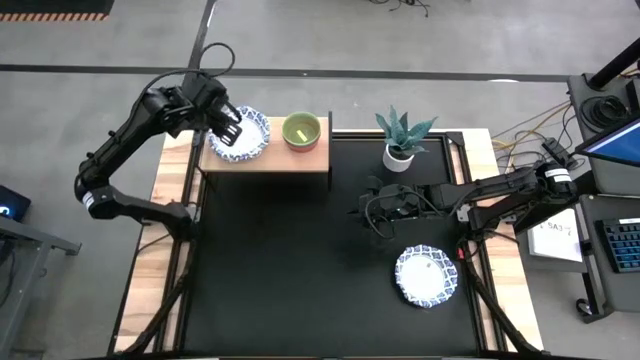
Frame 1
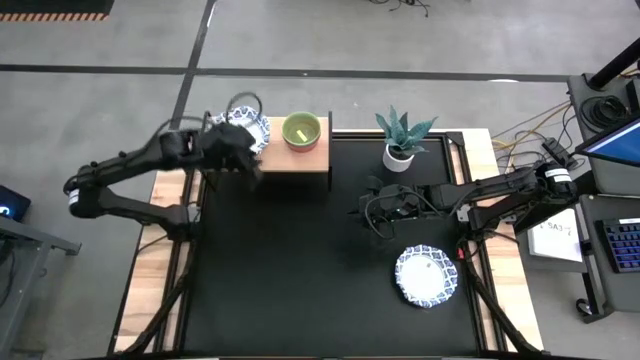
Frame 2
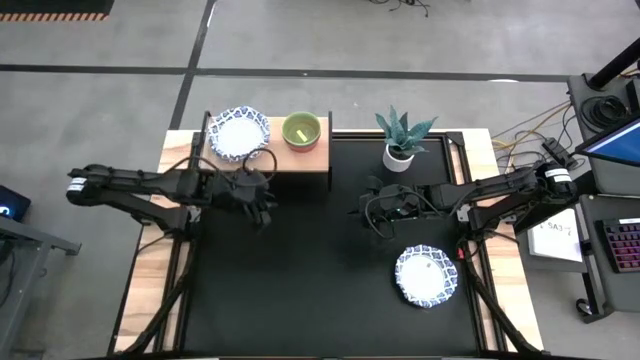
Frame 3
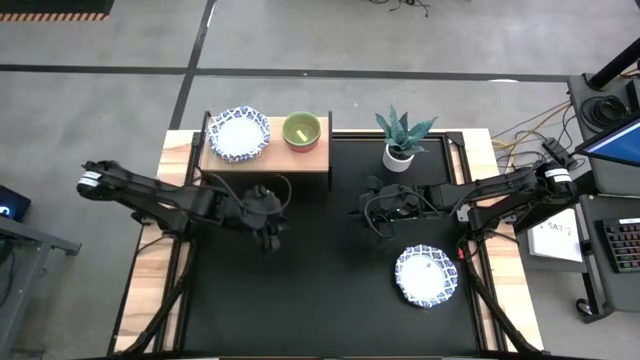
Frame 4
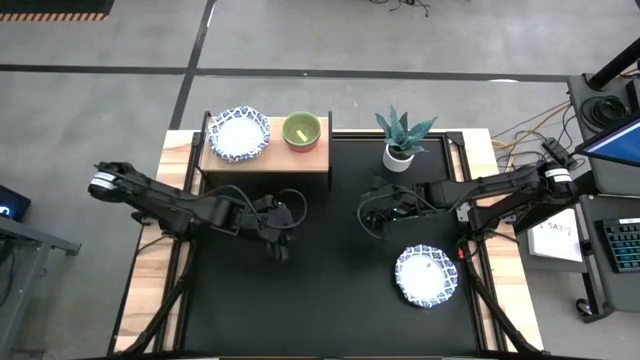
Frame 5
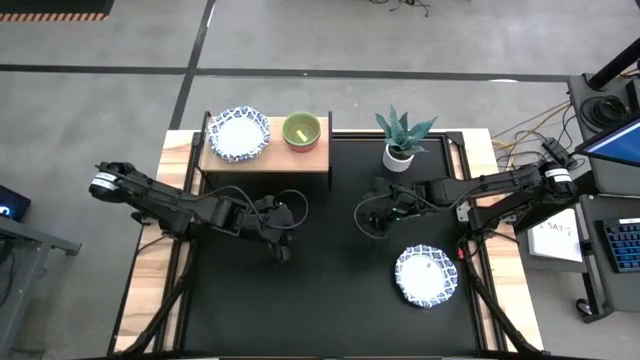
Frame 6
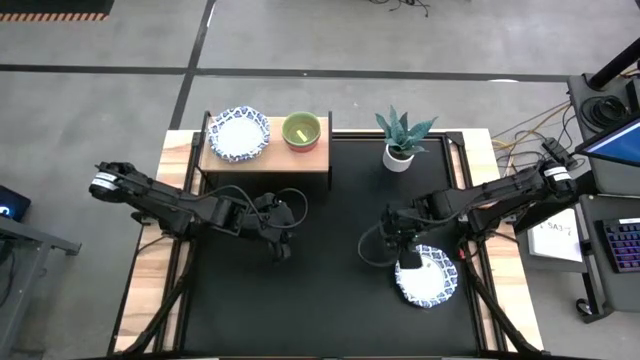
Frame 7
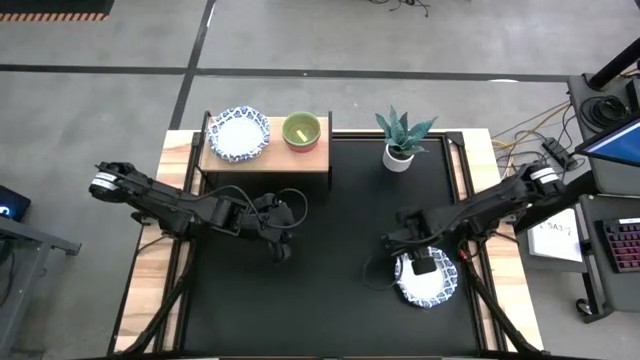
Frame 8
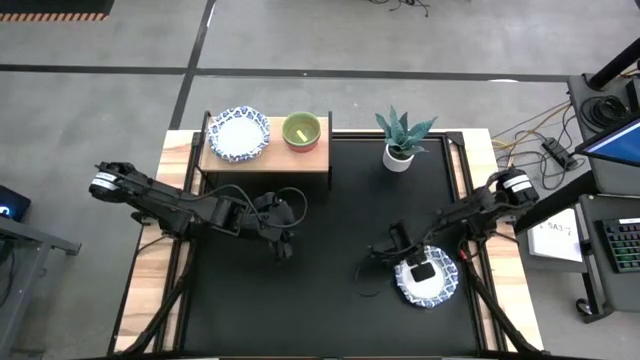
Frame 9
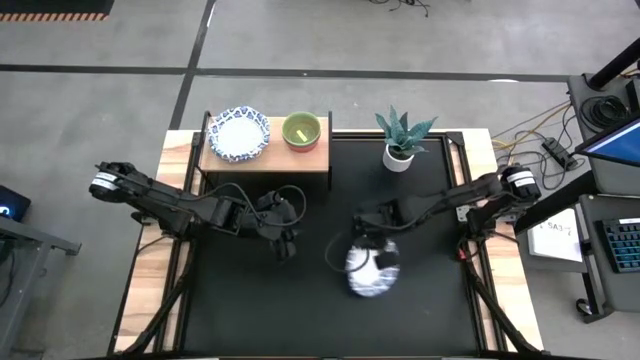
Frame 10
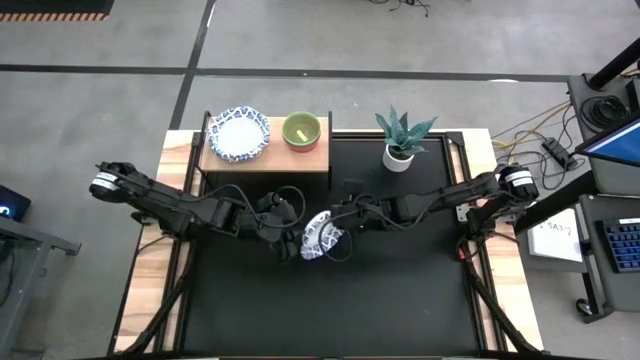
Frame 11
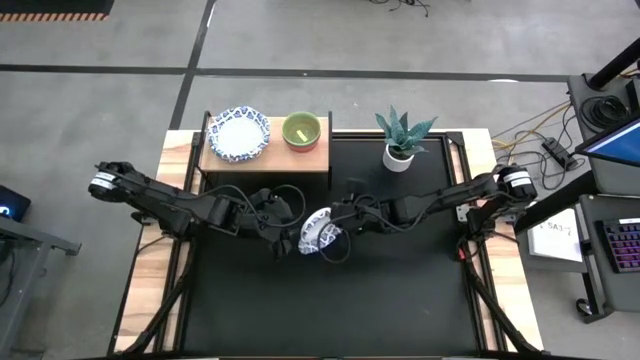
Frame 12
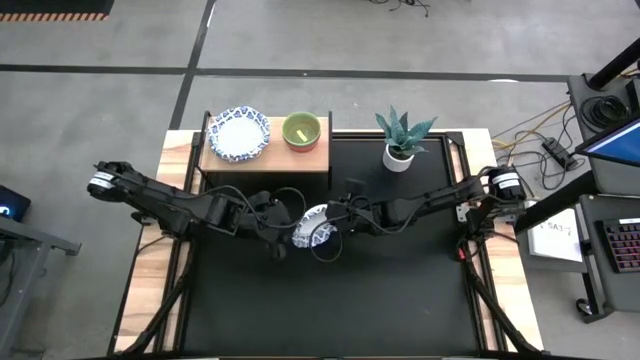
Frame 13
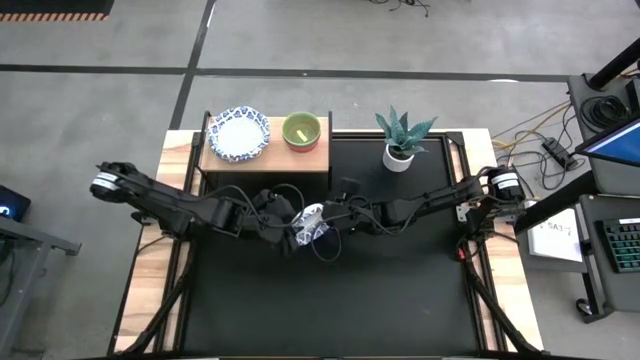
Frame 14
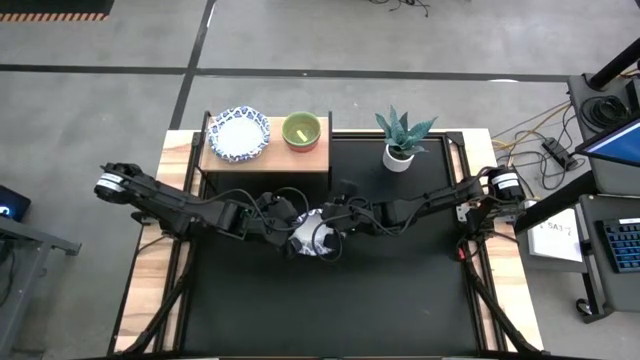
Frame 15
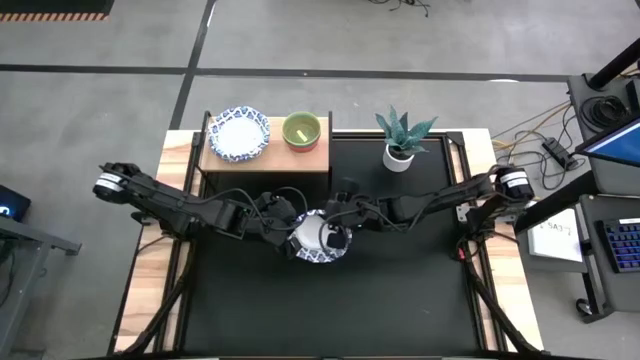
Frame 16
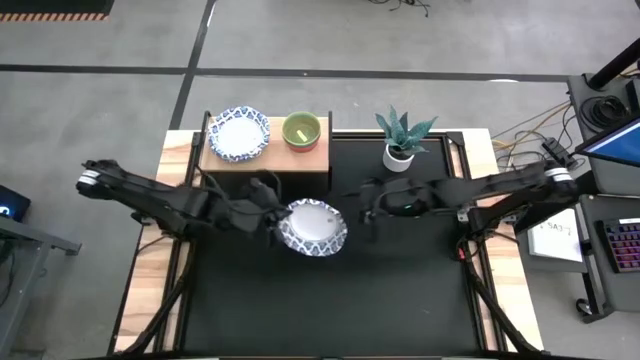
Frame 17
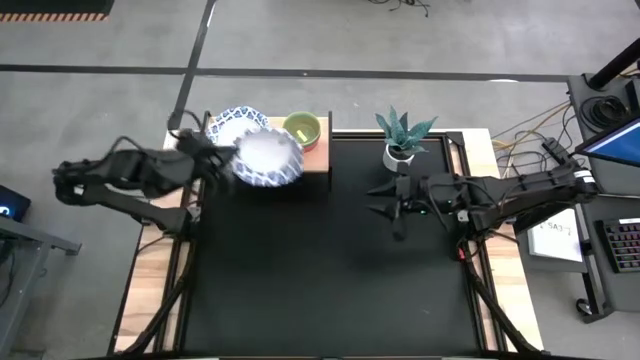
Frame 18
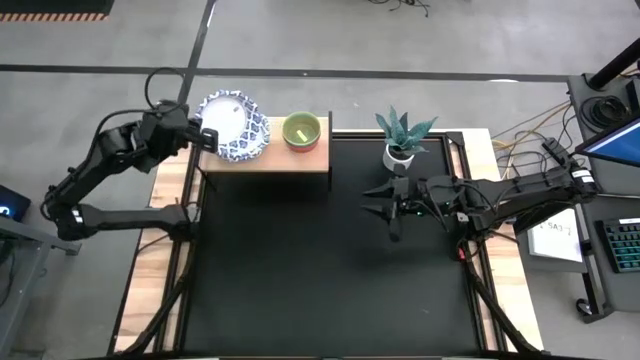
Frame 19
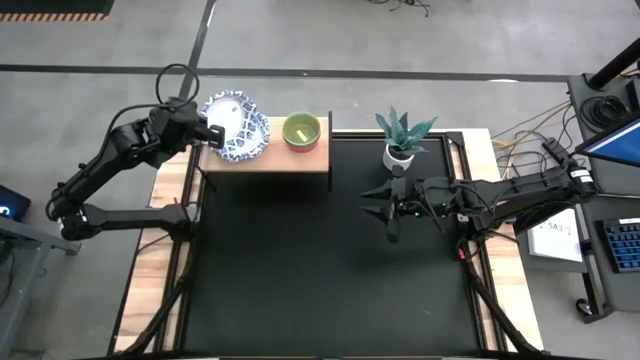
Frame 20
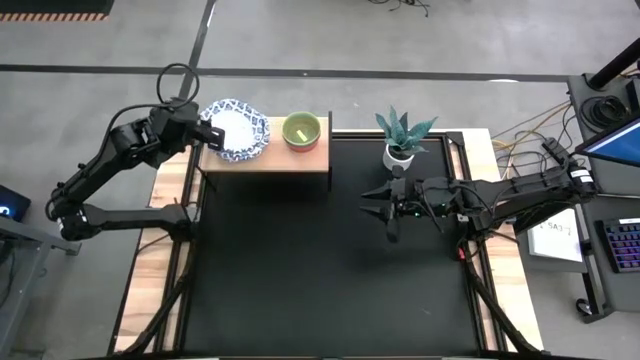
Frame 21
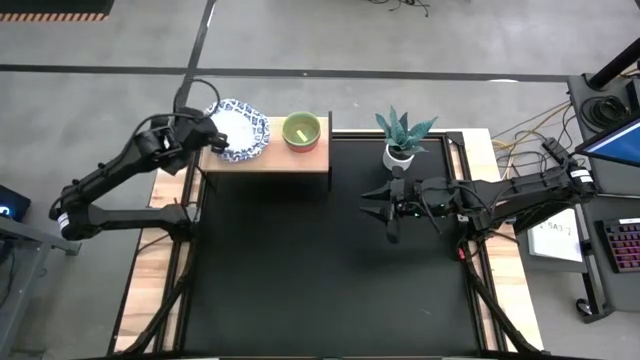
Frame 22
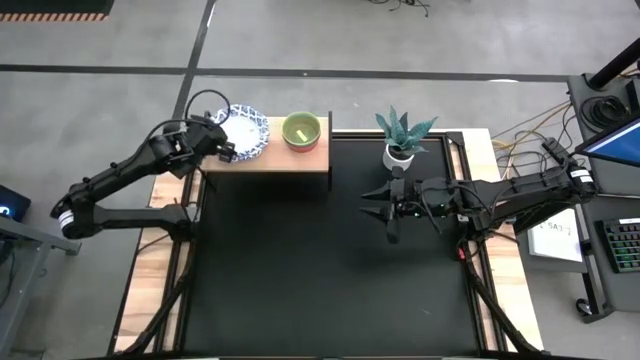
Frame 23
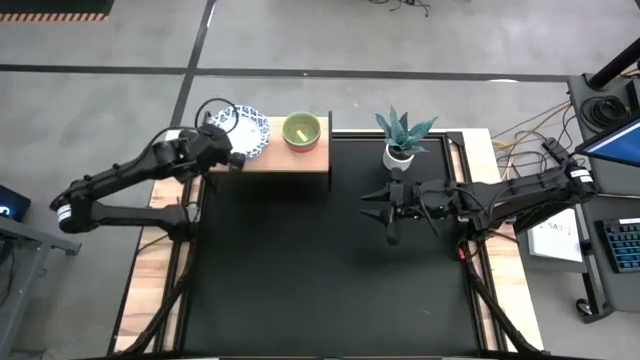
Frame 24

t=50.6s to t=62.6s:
Task: Place and stack bowls onto a shelf
Stack the white patterned bowl on top of the other white patterned bowls on the shelf

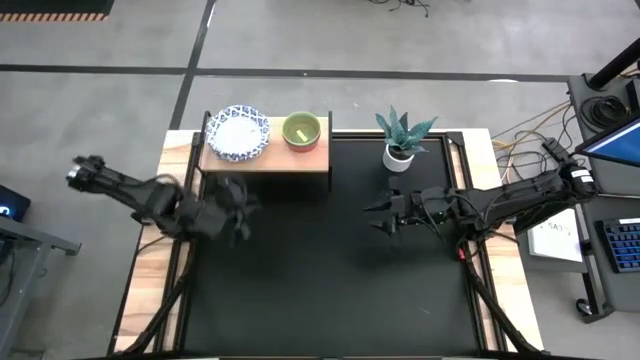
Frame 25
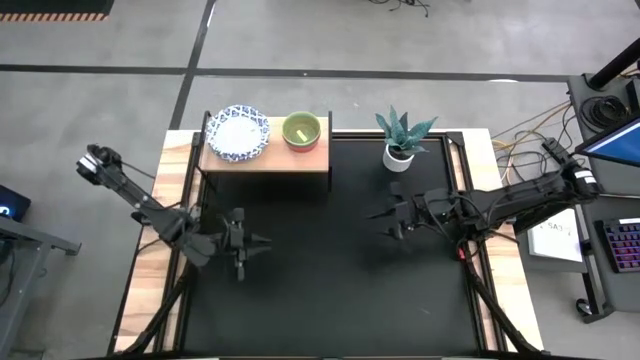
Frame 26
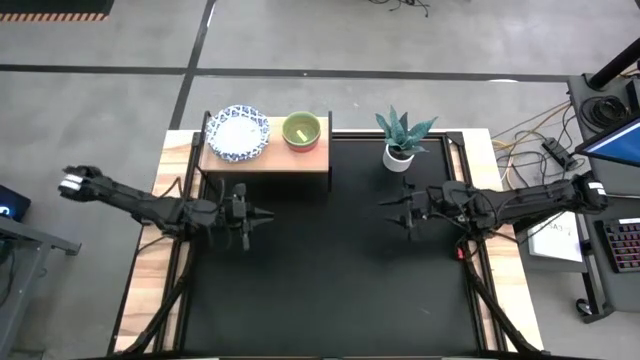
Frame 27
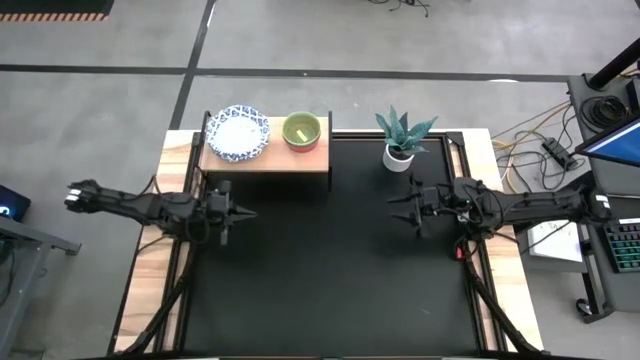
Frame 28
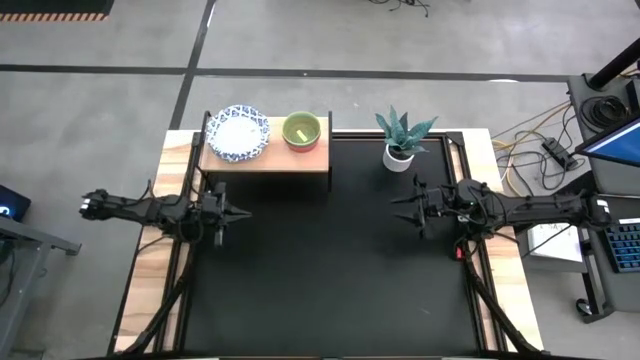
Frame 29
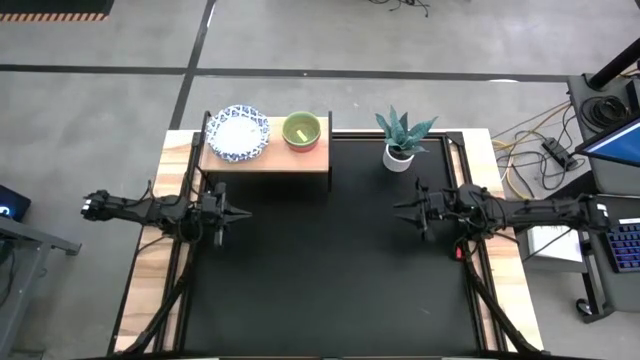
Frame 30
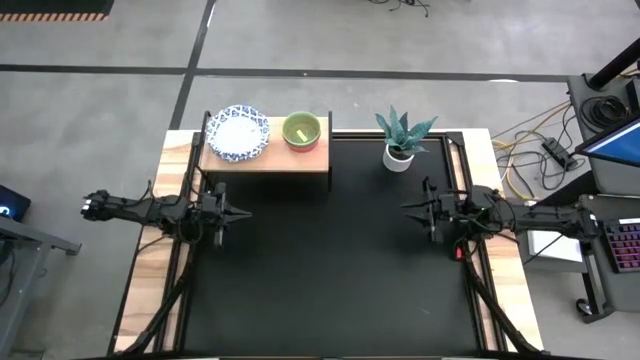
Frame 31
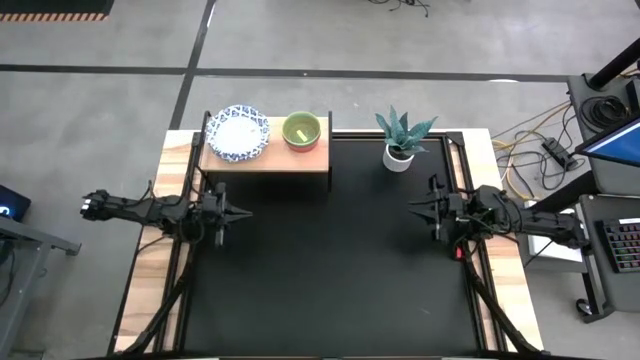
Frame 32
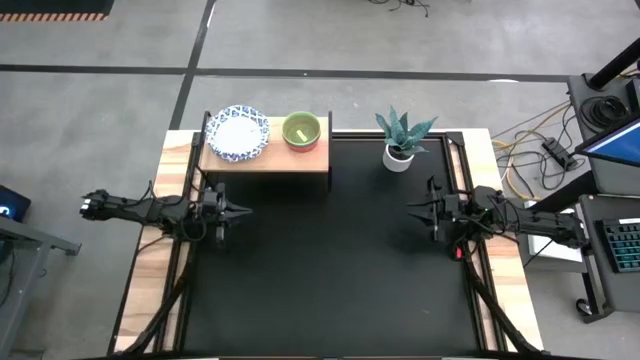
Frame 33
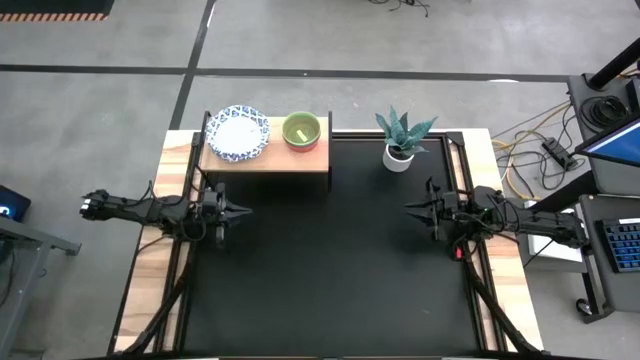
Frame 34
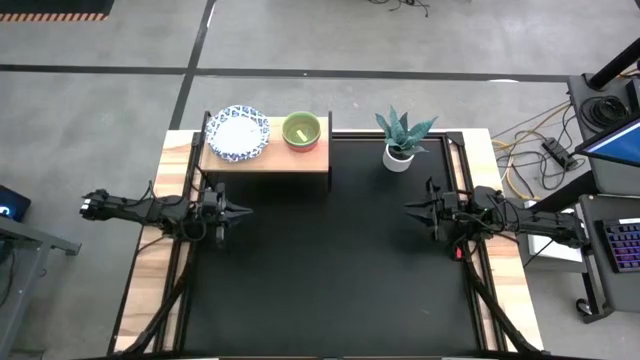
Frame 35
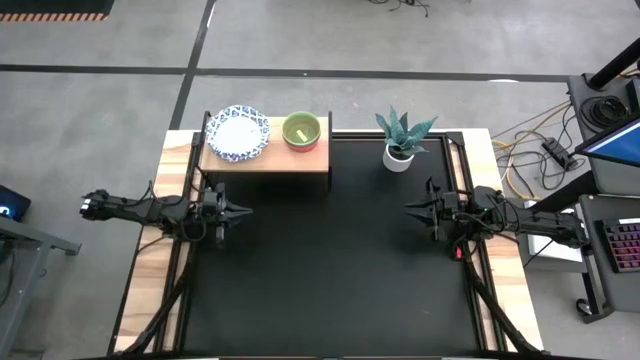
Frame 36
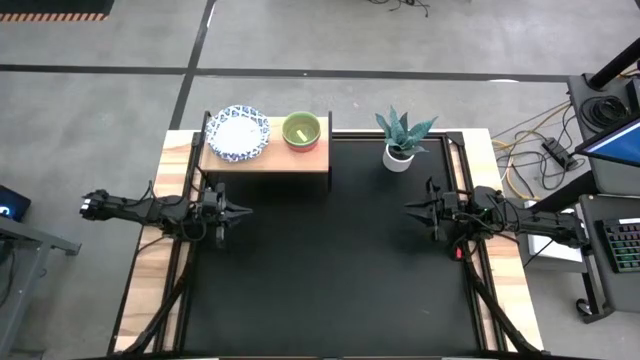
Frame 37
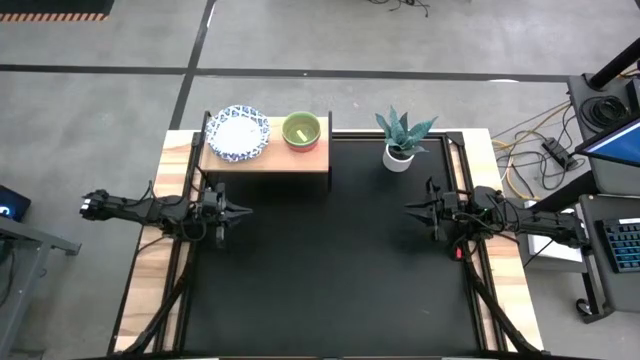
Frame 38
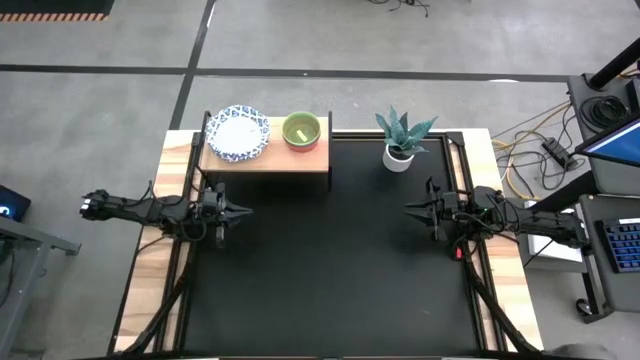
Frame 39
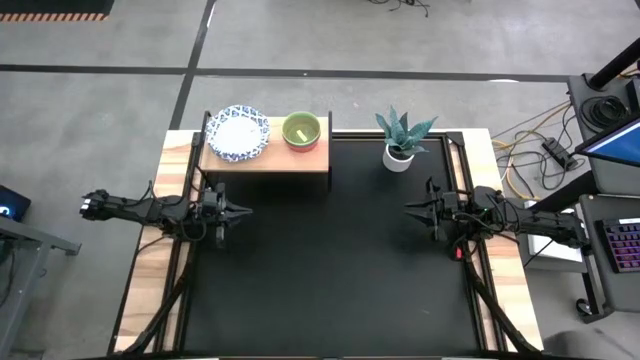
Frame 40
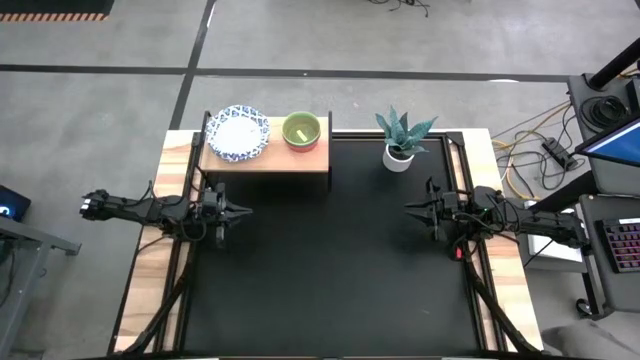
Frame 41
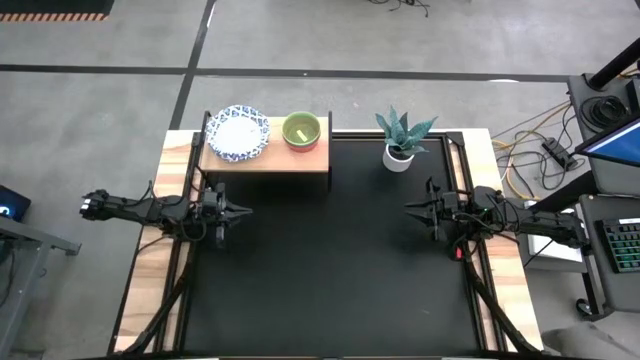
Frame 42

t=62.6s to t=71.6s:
Return to Home Position

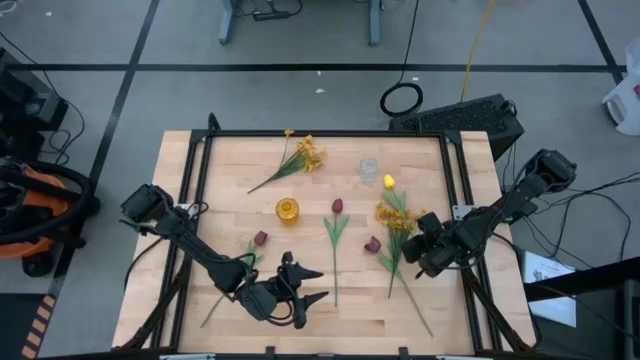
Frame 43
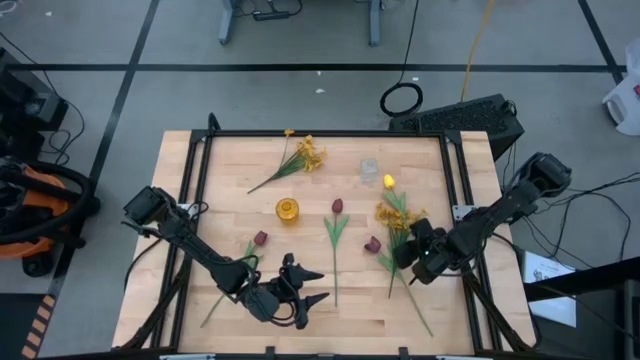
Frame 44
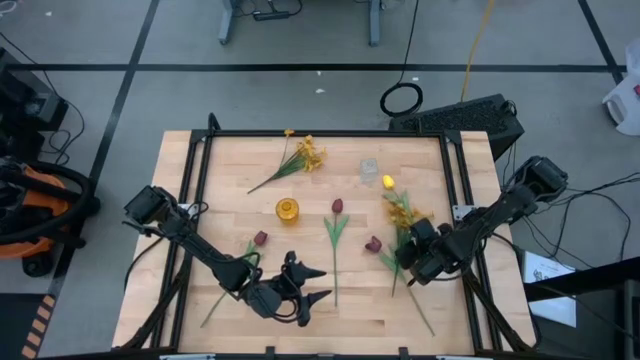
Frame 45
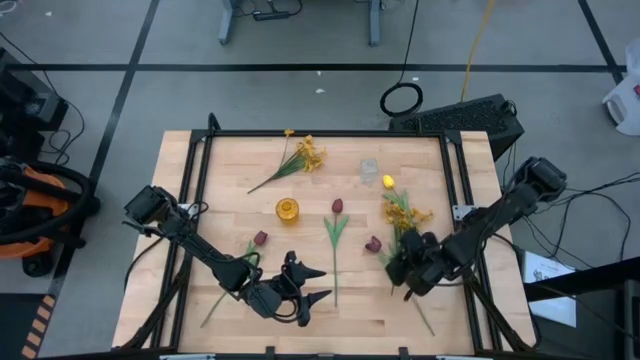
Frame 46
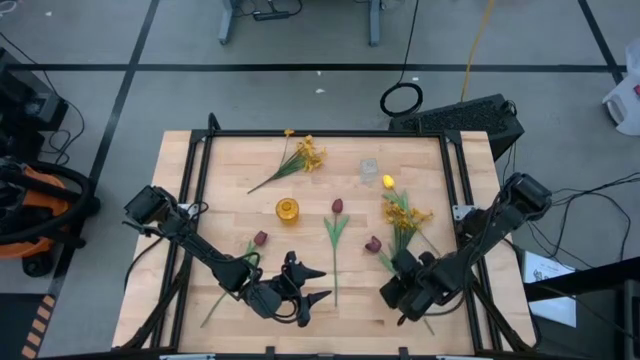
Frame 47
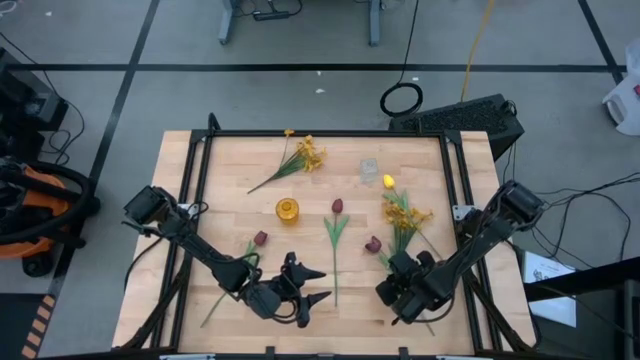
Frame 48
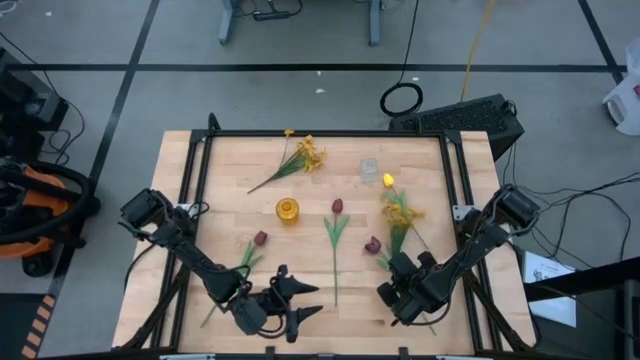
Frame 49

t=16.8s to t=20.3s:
Task: Sort flowers into vase by color
Adjust the bottom yellow flowers
